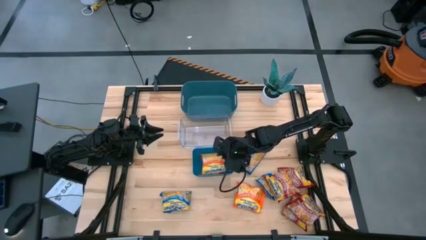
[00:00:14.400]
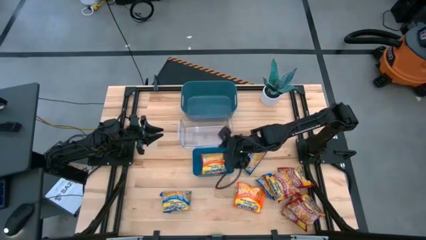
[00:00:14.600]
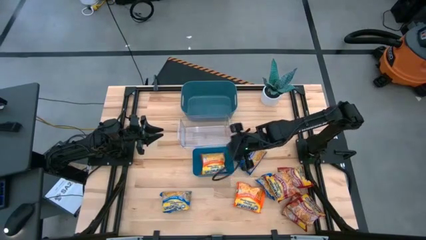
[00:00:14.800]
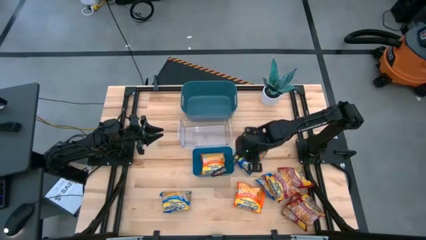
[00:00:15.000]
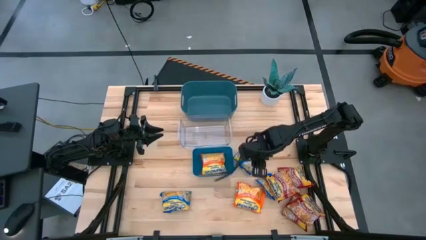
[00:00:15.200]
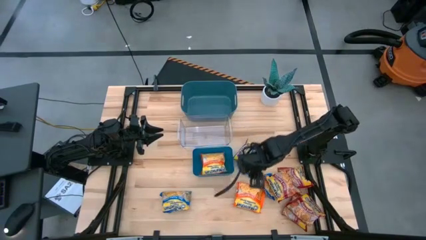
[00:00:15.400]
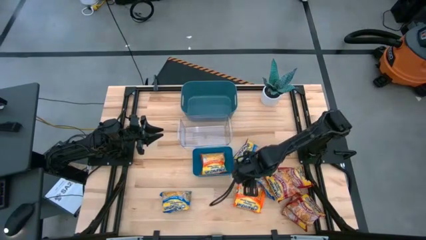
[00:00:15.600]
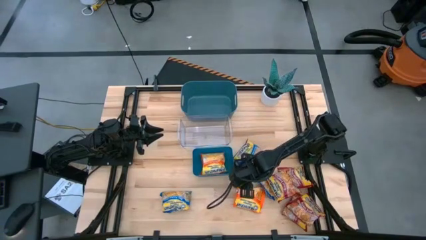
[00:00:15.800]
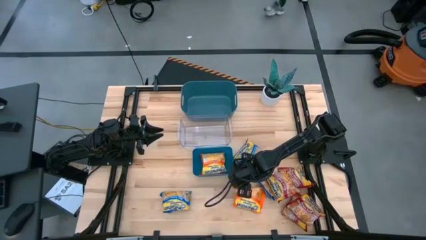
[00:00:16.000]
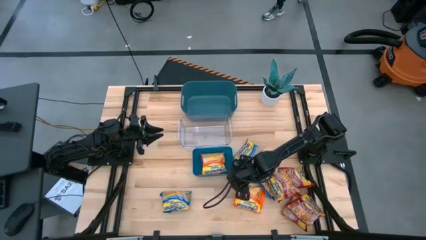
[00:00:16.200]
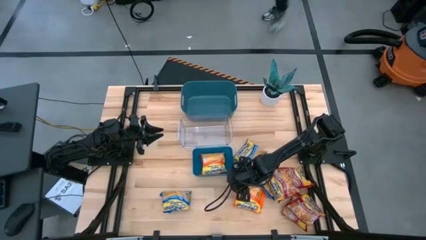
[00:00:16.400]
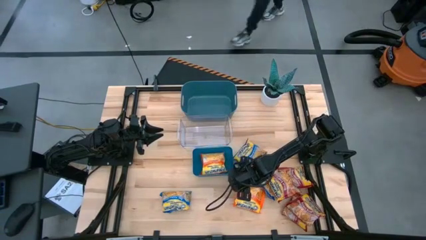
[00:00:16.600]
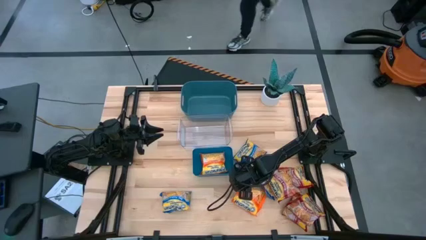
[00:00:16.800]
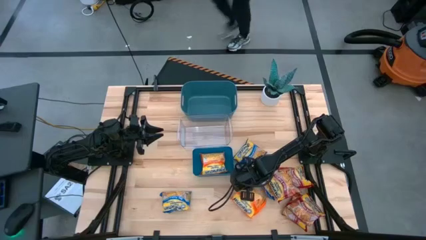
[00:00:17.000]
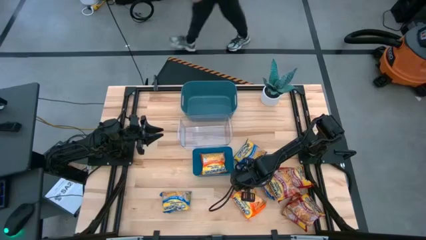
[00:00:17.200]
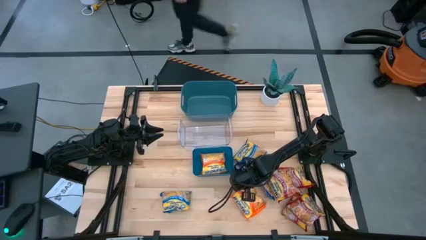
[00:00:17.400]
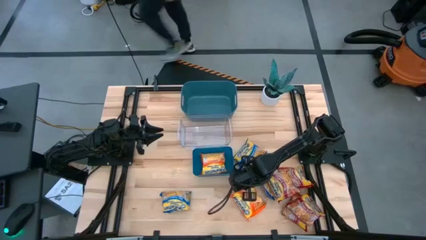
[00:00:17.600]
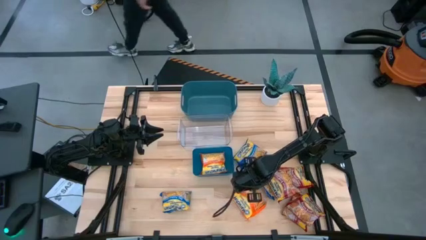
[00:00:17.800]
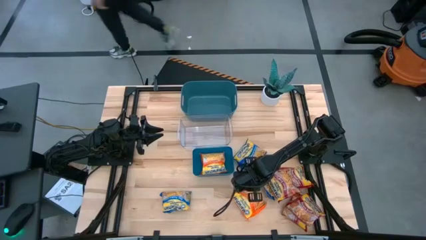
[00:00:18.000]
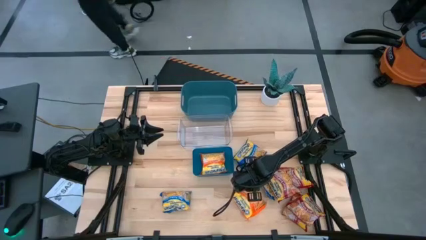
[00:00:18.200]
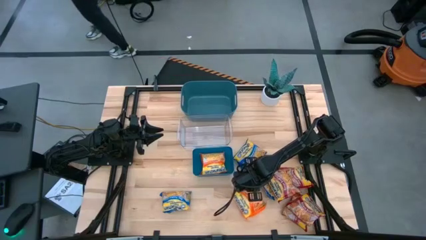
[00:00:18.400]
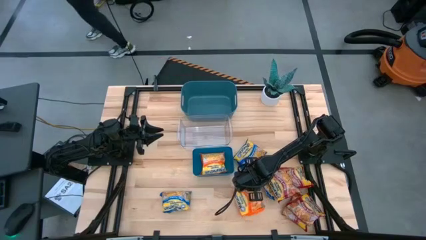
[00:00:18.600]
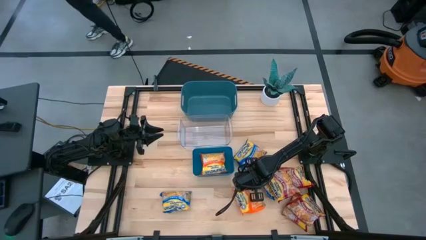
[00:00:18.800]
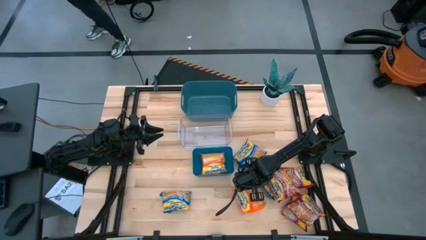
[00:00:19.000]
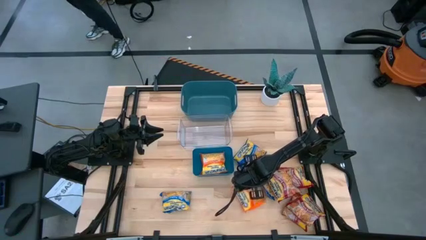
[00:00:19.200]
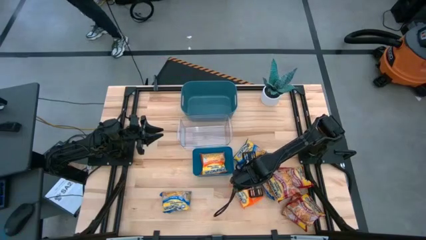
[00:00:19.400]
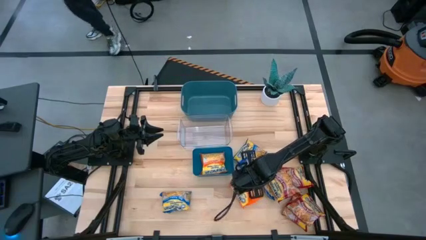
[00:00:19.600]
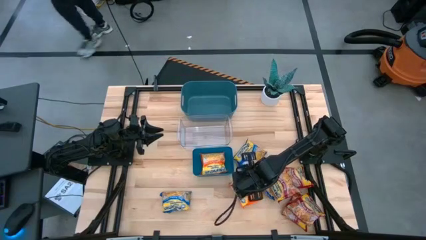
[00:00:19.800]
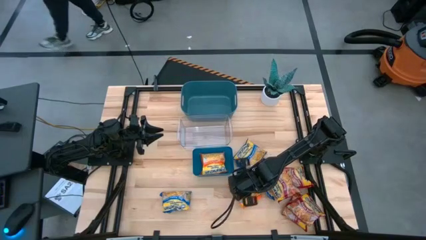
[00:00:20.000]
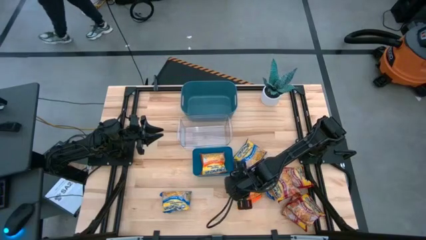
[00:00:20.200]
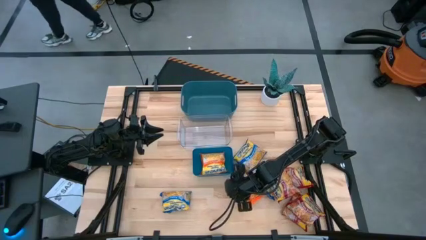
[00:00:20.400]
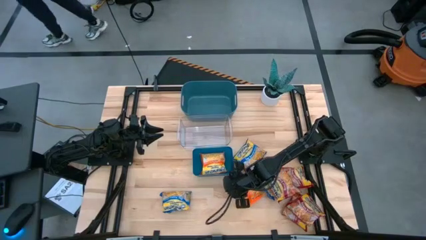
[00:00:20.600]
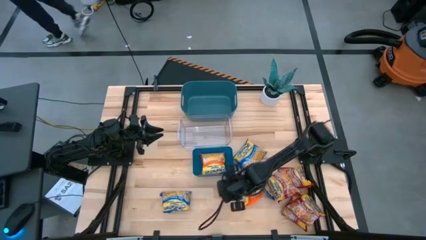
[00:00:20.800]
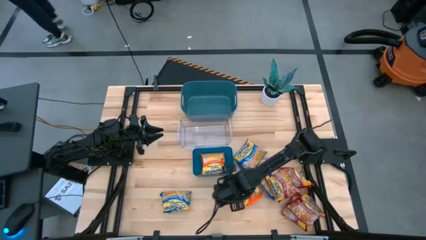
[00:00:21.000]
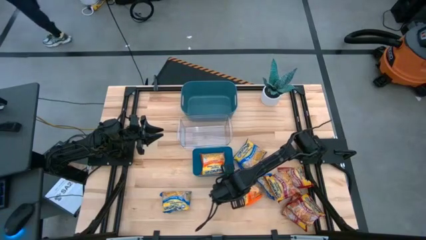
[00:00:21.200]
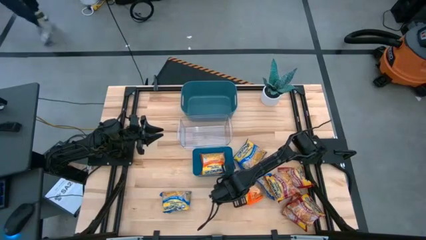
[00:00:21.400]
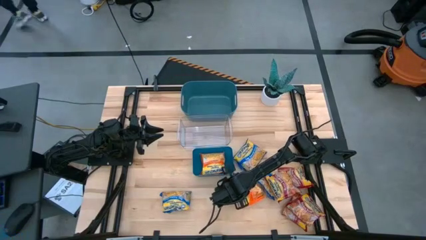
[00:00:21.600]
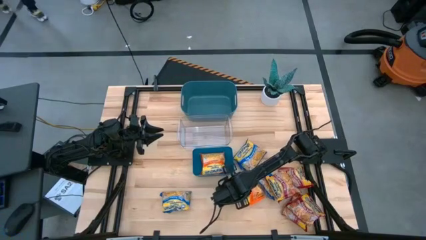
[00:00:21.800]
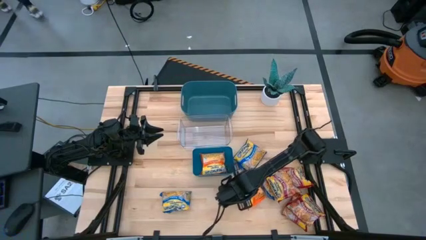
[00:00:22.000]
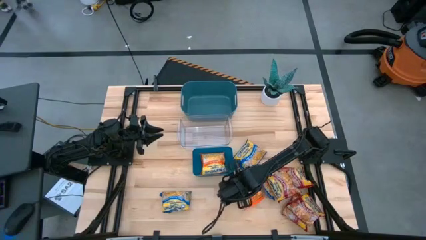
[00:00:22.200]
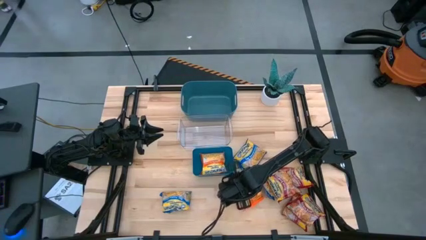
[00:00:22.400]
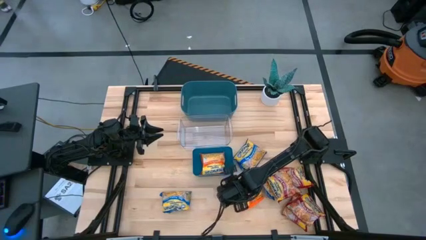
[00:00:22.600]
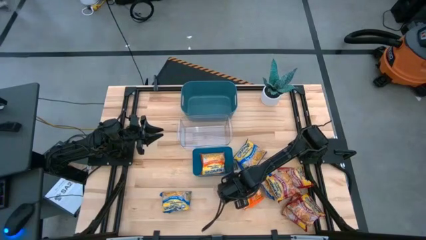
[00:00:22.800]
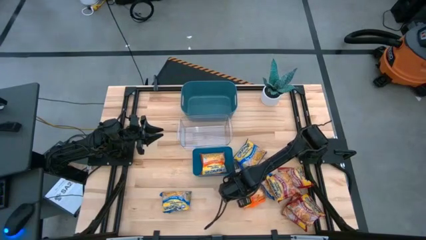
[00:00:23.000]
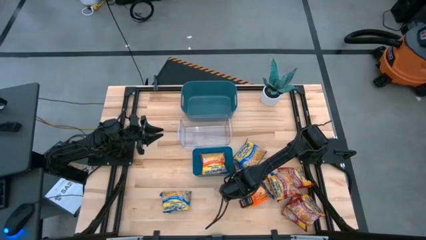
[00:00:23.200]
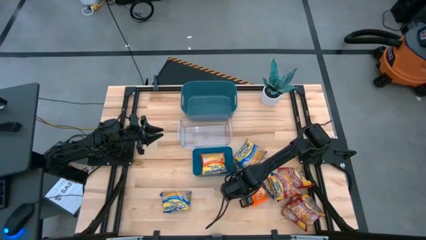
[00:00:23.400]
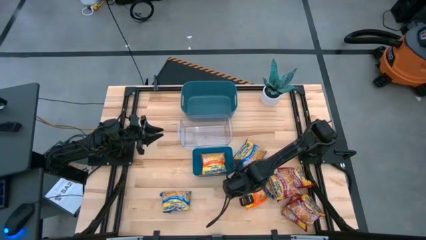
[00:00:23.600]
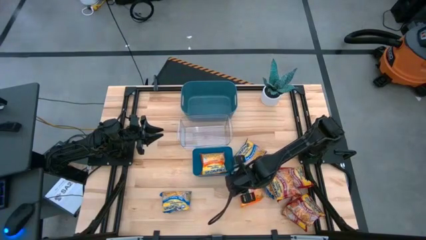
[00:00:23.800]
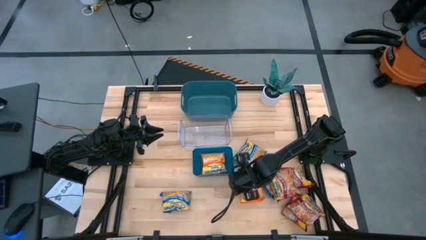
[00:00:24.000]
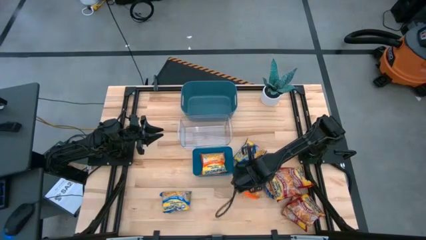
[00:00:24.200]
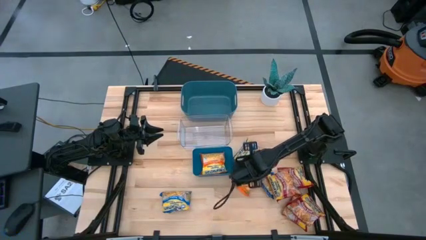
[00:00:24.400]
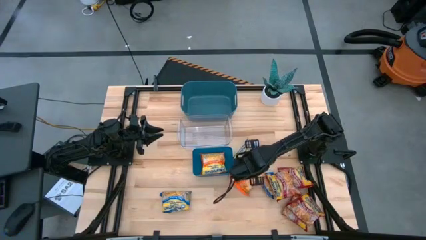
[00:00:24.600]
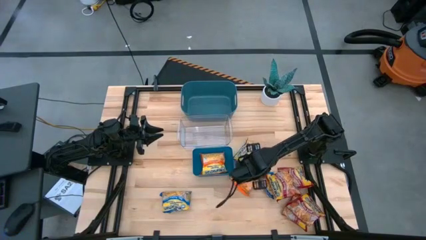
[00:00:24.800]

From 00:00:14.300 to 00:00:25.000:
Task: Sort Maruchan noodles
Put the bottom orange noodle pack into the bottom blue bin

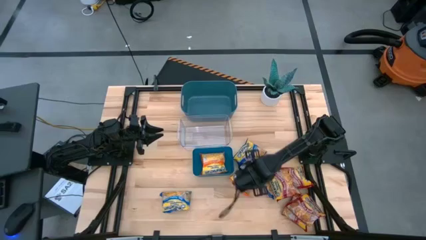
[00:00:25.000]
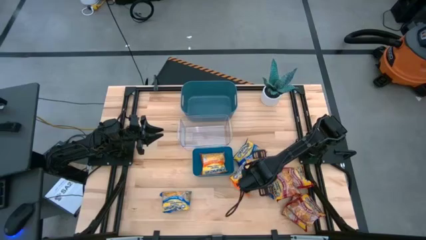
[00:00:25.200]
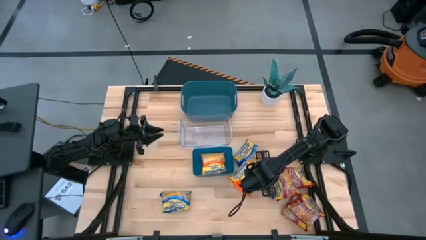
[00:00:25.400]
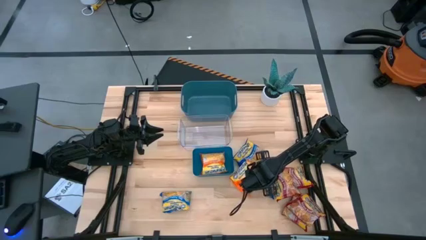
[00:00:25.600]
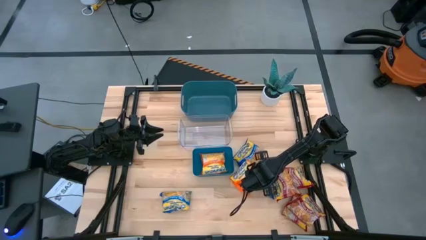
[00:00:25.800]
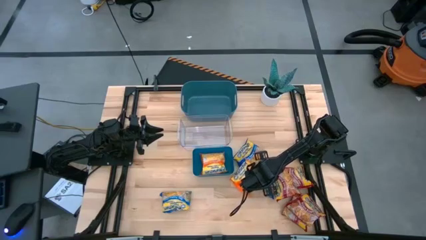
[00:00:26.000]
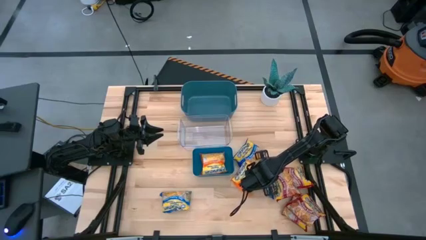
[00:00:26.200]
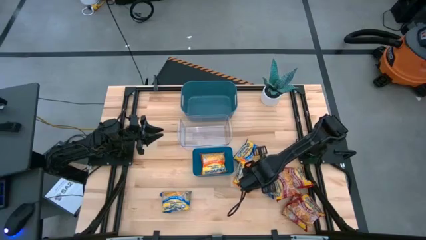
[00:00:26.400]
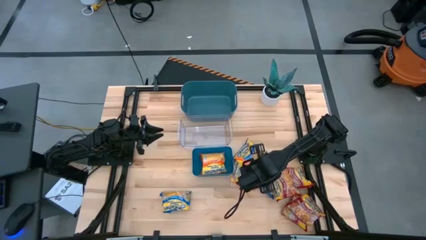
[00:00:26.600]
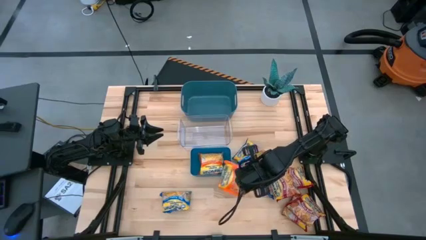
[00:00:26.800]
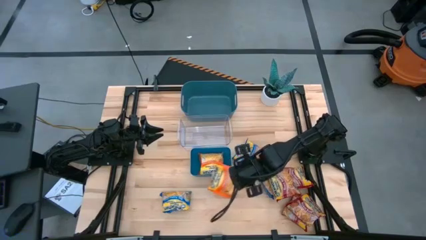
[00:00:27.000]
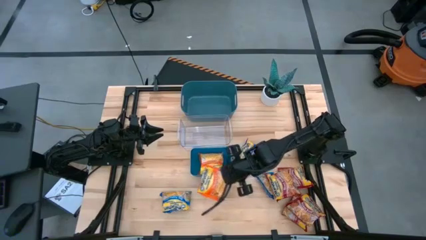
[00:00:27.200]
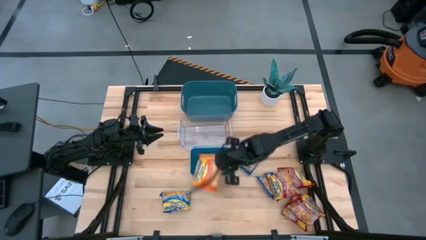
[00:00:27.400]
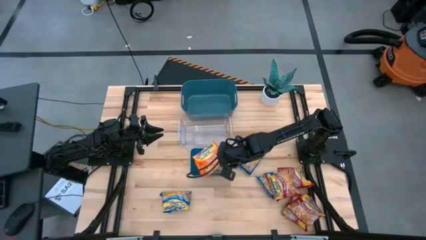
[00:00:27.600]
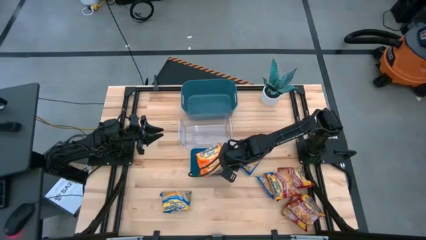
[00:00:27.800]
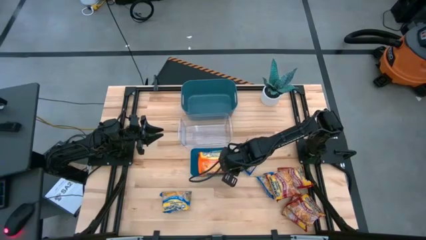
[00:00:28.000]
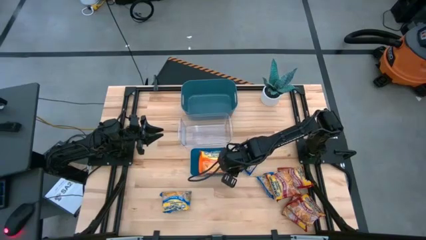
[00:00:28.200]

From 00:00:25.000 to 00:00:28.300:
Put the bottom orange noodle pack into the bottom blue bin

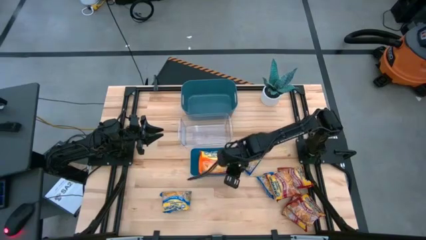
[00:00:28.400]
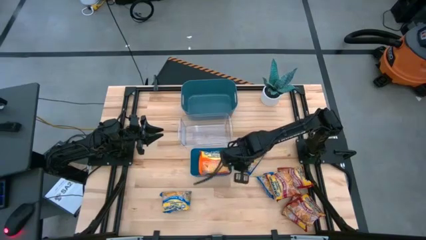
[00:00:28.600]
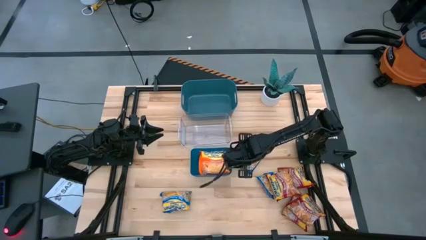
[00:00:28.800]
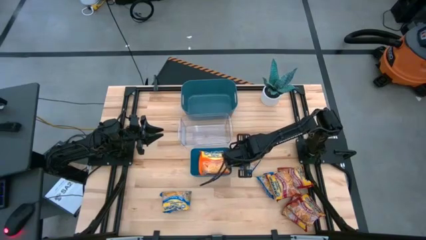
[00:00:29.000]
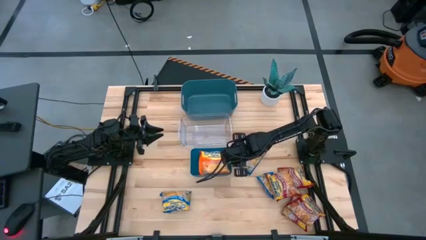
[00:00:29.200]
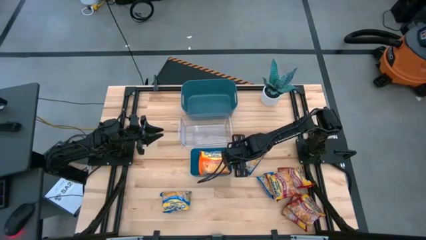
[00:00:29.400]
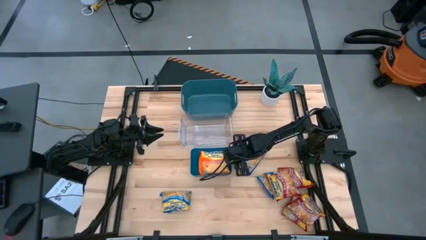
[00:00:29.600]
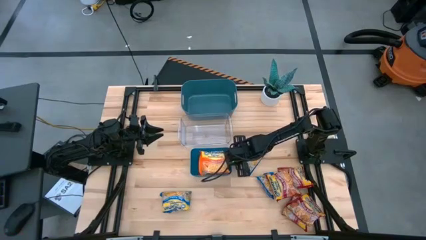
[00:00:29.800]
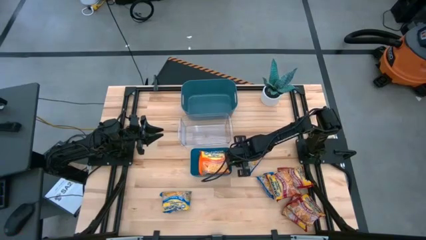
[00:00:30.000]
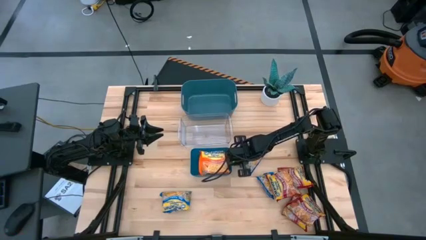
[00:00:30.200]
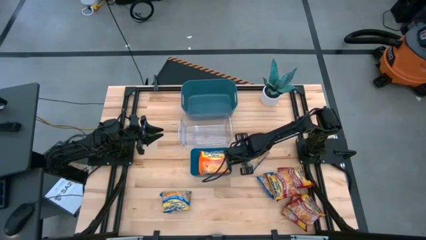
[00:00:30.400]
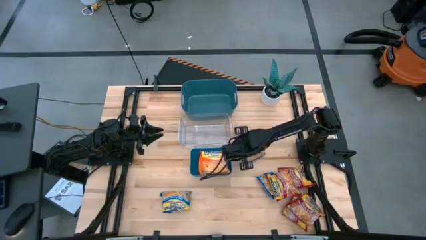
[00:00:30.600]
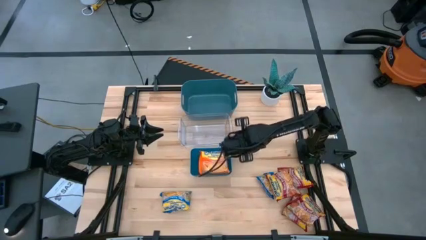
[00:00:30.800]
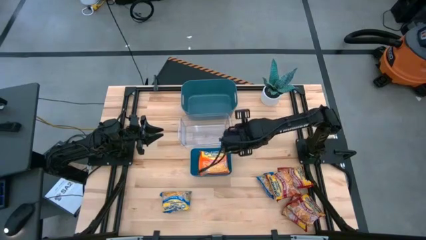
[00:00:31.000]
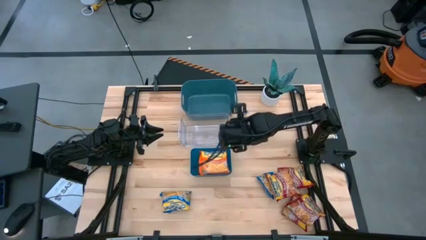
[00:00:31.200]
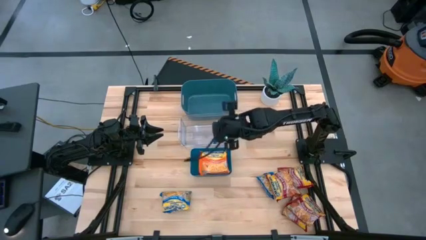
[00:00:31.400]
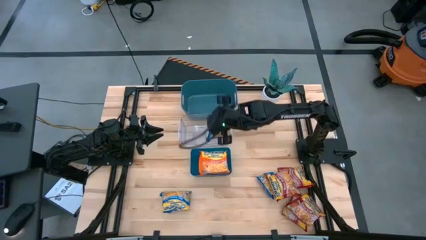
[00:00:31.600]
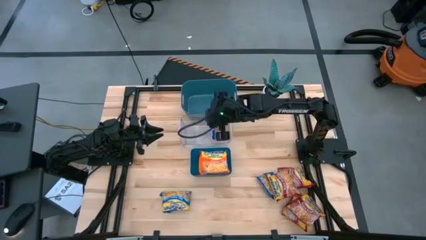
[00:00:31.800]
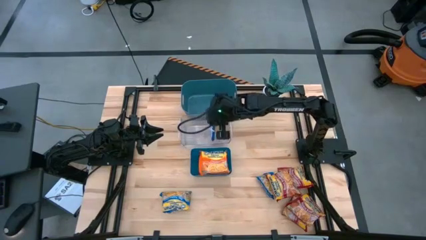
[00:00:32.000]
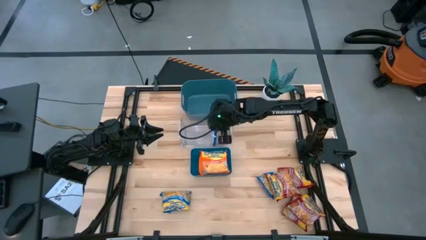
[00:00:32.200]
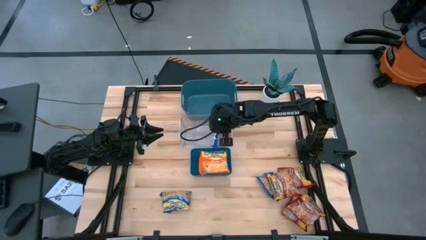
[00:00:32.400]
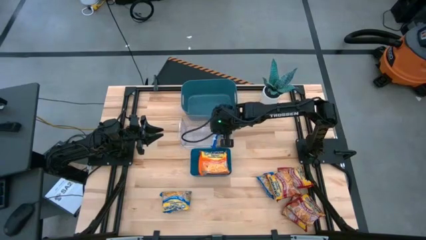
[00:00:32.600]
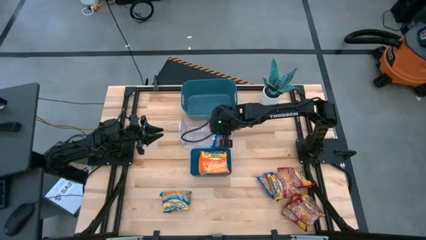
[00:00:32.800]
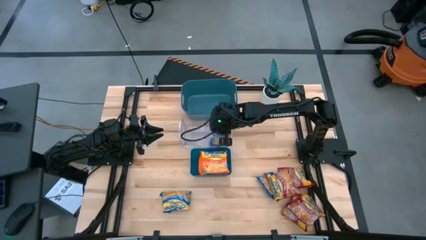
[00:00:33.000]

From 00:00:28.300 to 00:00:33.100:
Put the blue noodle pack into the transparent bin
